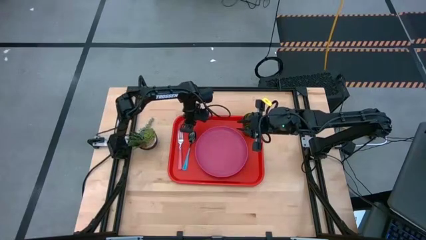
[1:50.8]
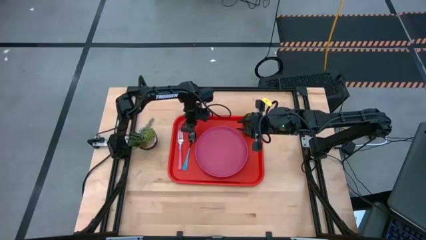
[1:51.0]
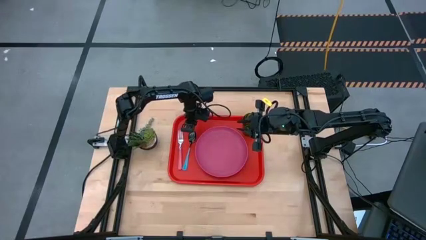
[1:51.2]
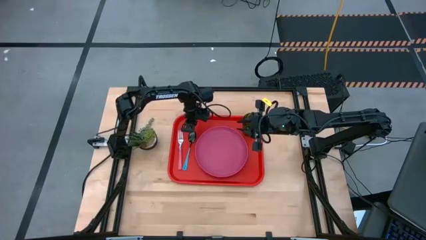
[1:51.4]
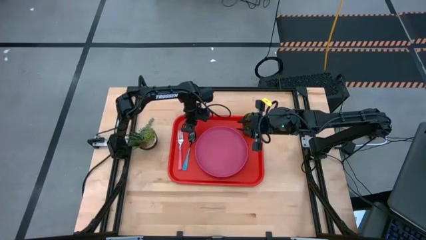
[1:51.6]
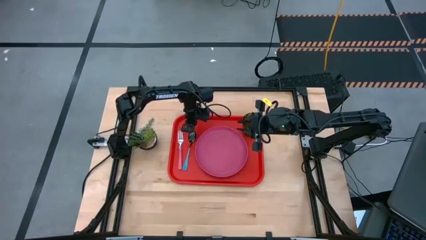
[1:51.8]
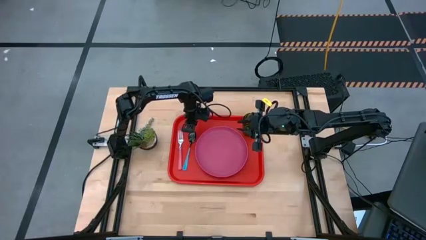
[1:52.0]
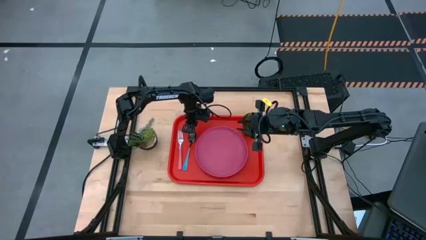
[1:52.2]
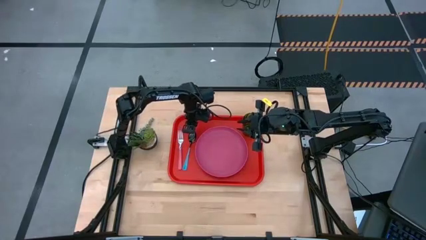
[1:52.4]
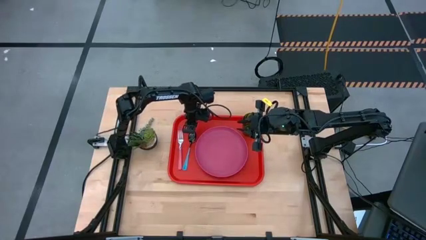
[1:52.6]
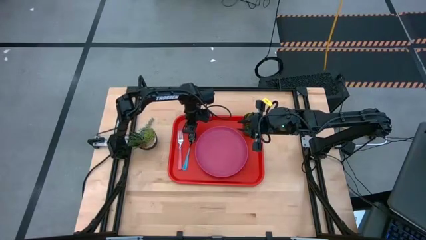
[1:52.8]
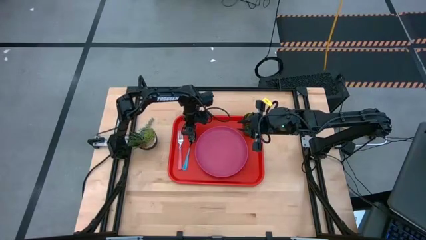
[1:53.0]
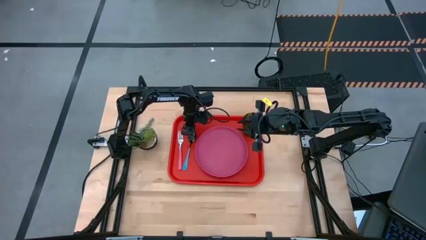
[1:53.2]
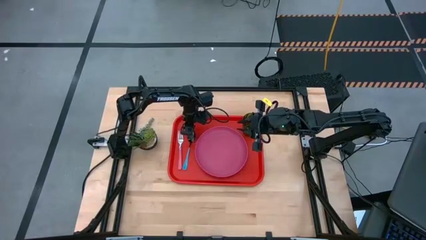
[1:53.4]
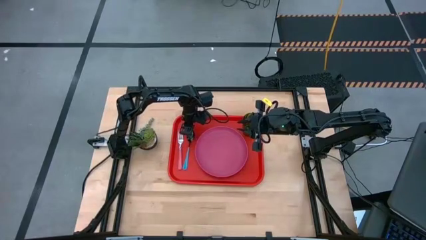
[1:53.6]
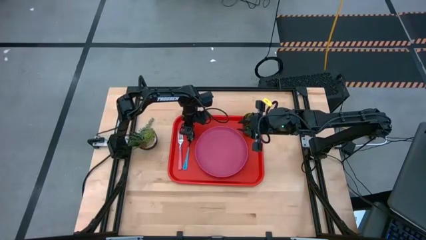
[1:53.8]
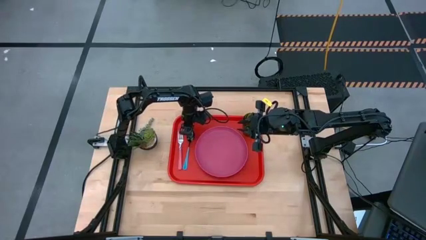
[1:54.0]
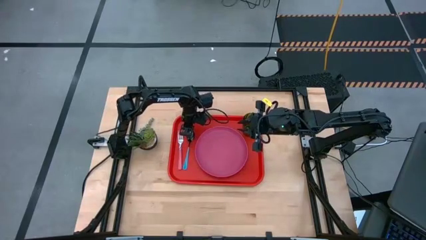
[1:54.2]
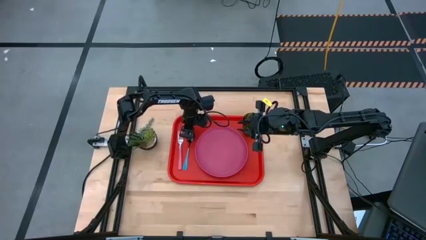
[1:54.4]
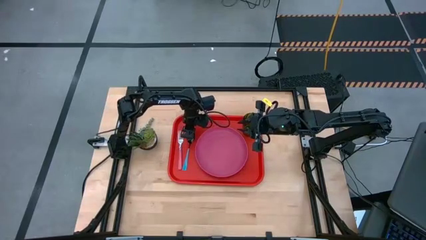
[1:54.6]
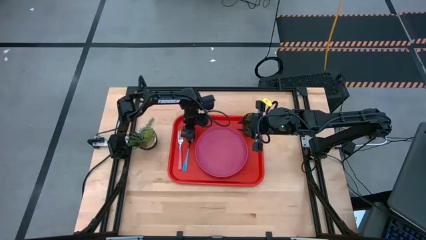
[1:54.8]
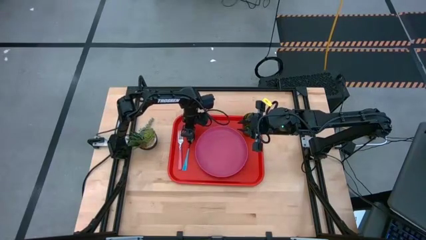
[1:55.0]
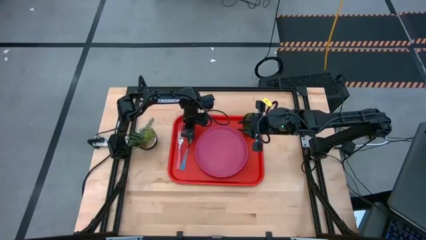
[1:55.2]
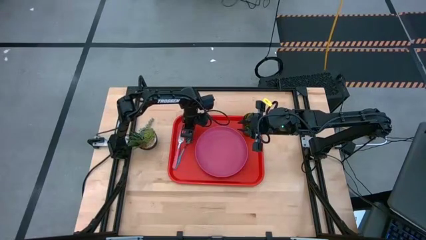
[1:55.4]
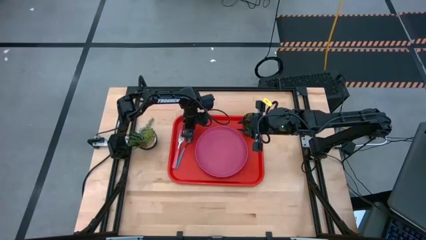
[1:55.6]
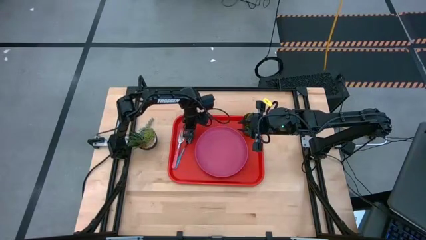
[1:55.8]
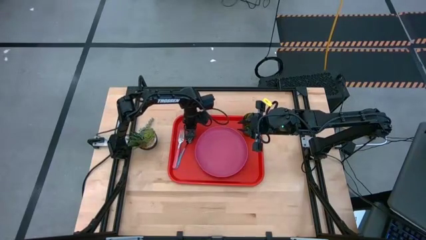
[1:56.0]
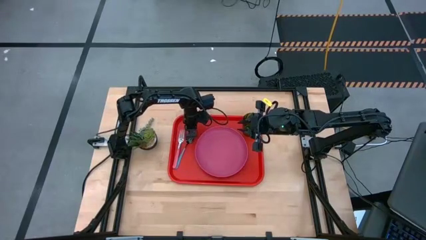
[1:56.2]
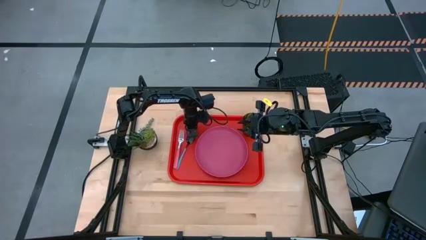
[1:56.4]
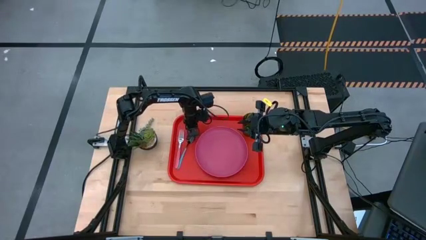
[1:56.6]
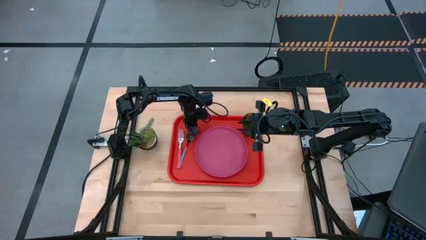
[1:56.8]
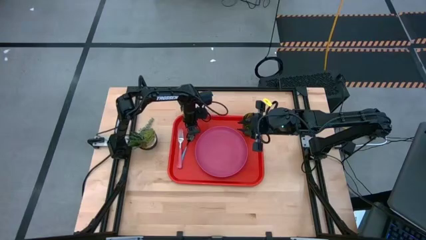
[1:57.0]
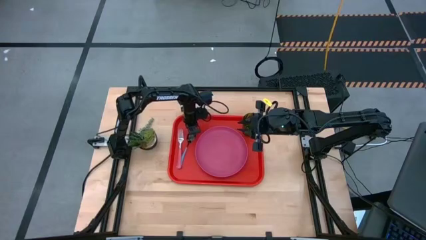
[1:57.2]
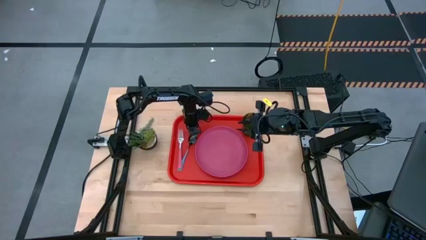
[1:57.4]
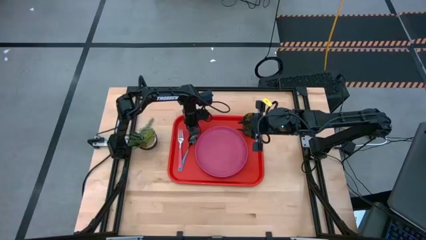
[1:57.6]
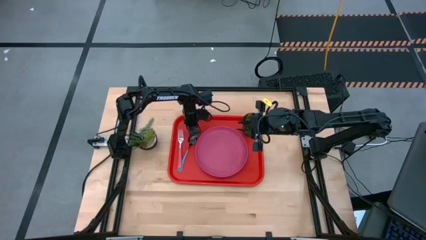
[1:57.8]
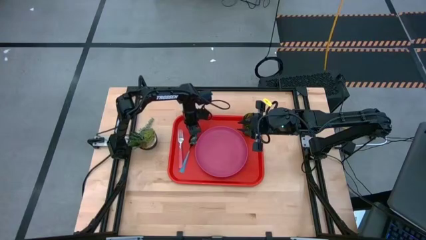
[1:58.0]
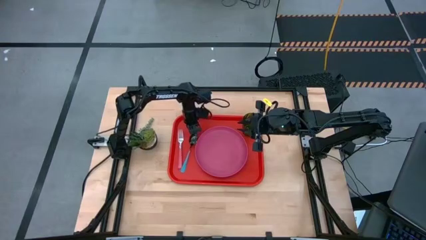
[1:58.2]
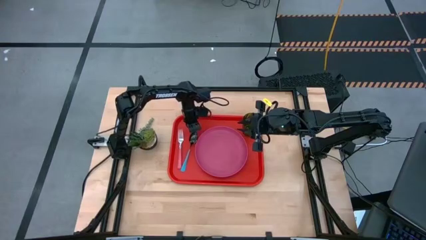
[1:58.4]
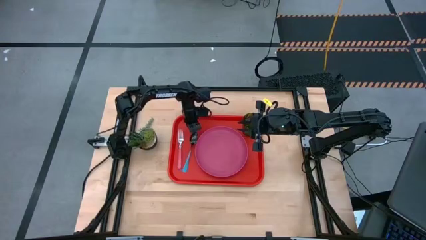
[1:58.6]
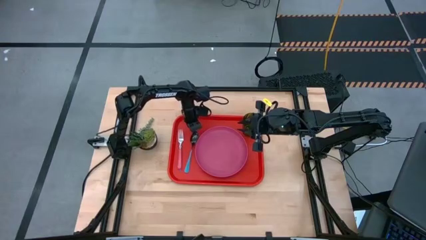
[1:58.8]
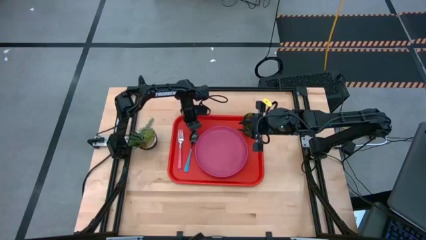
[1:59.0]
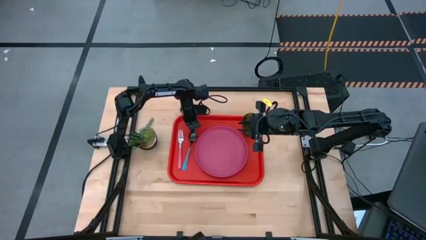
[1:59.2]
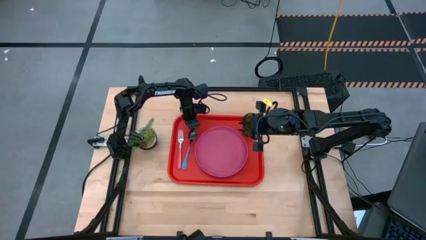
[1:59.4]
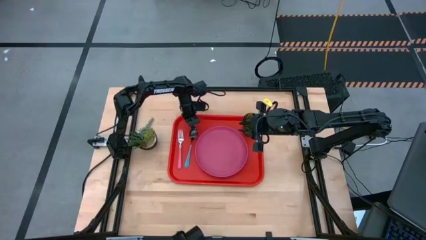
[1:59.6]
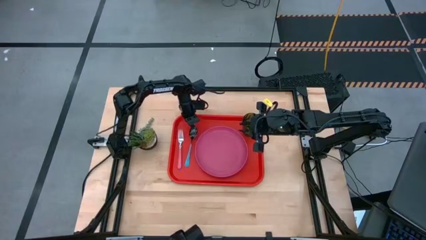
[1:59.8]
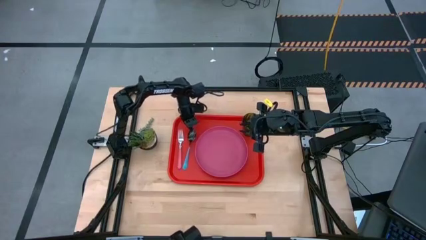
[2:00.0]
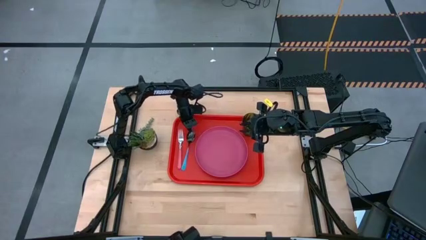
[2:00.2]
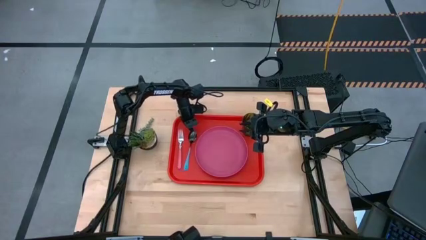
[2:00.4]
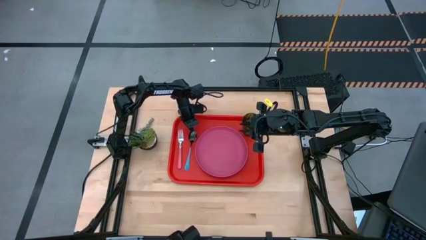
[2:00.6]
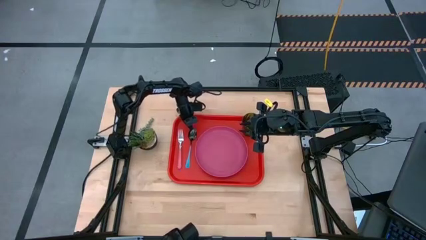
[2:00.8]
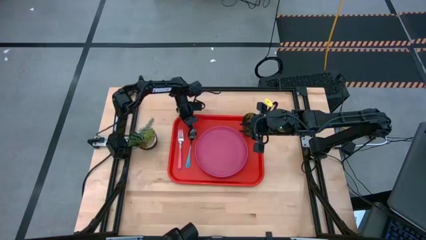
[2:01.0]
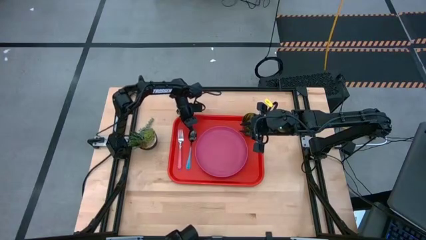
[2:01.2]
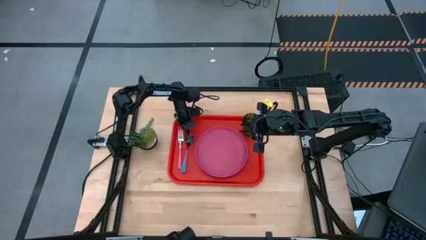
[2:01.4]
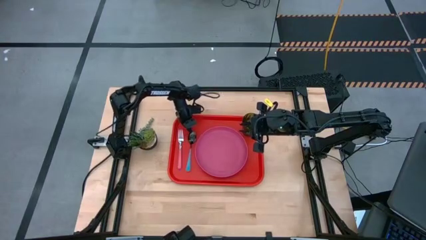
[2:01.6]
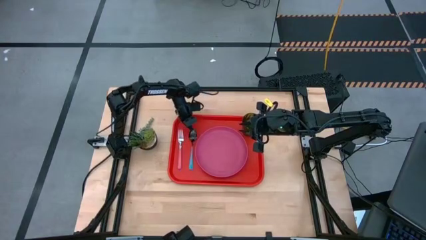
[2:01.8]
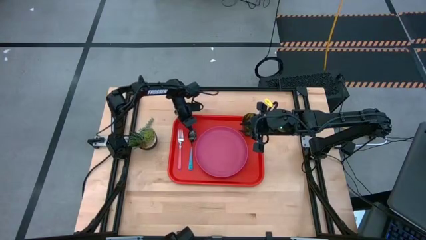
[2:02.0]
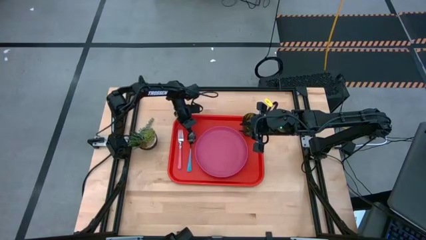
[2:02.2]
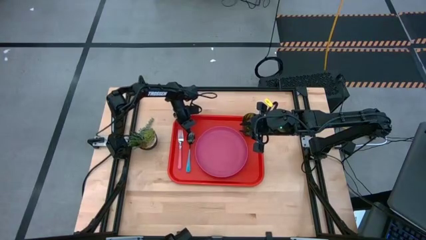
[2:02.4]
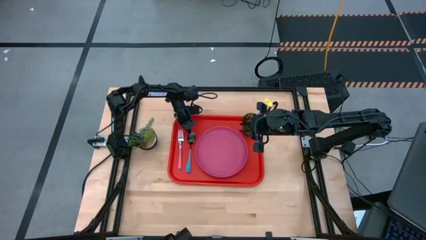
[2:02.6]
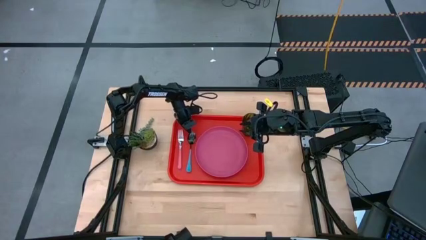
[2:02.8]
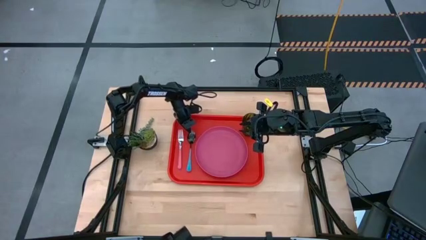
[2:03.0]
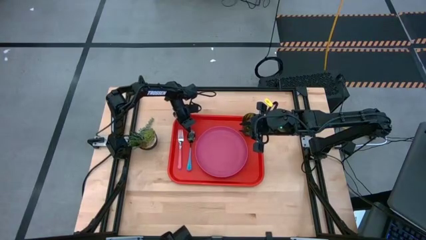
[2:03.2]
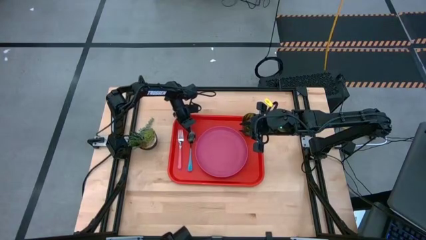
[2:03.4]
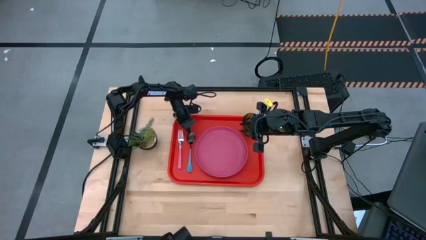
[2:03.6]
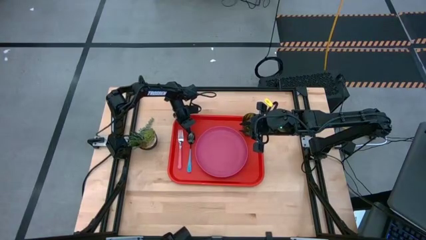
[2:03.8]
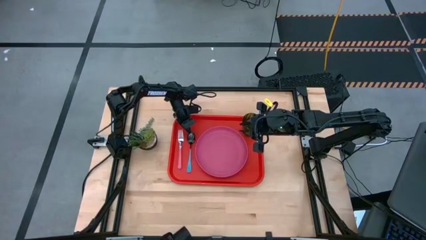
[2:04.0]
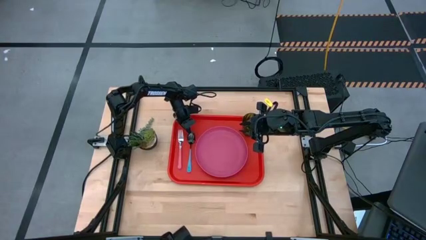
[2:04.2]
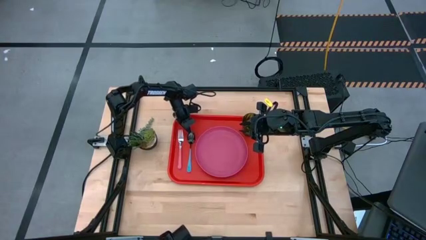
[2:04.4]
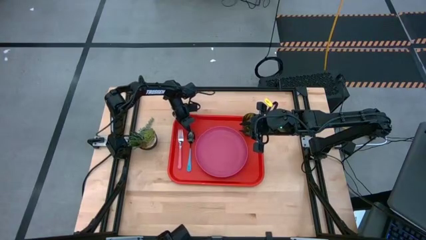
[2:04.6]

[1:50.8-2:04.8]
Task: Pick and place plate/cup/fork/spoon on tray
Adjust the silverware on the red tray

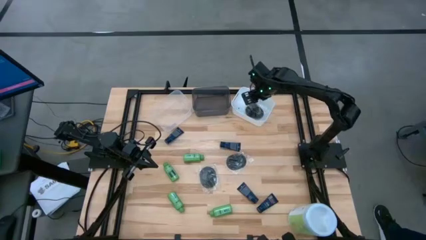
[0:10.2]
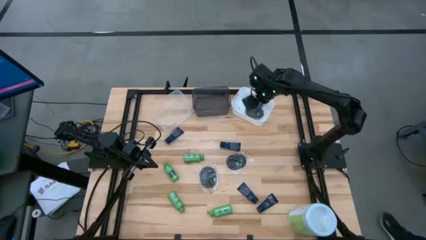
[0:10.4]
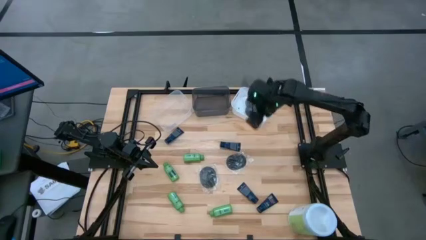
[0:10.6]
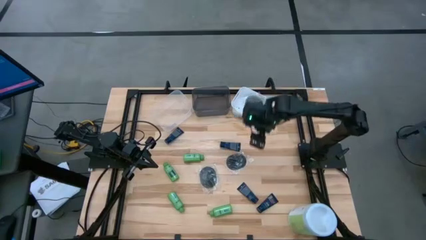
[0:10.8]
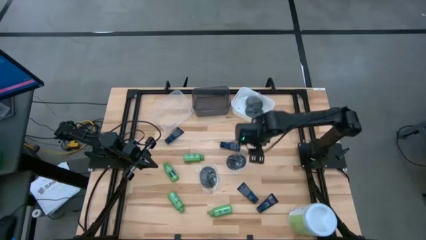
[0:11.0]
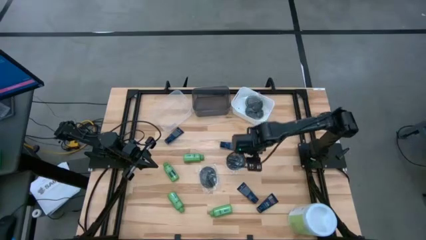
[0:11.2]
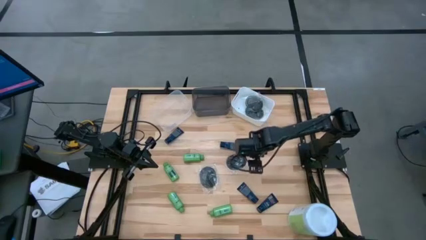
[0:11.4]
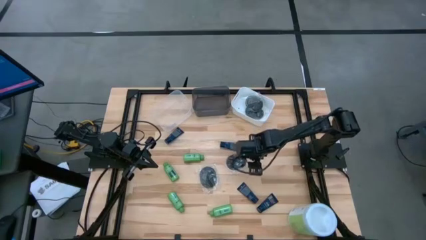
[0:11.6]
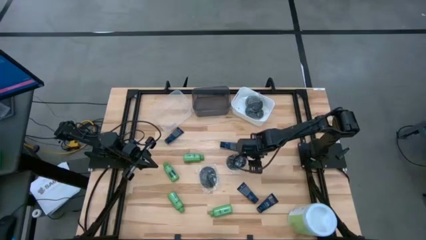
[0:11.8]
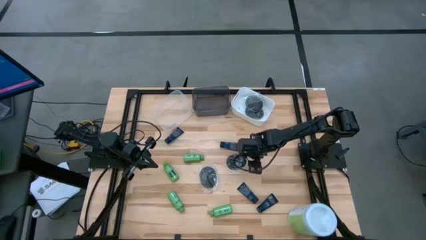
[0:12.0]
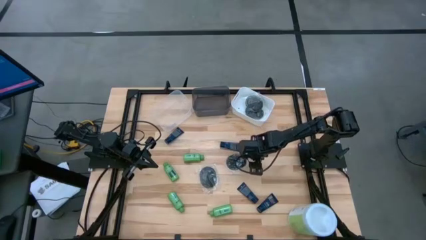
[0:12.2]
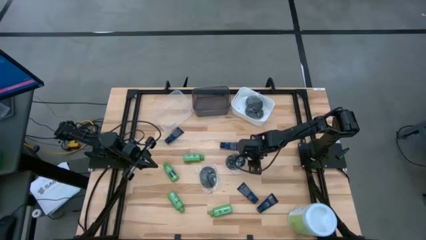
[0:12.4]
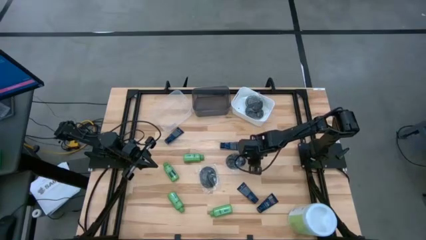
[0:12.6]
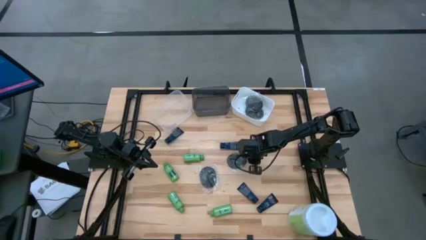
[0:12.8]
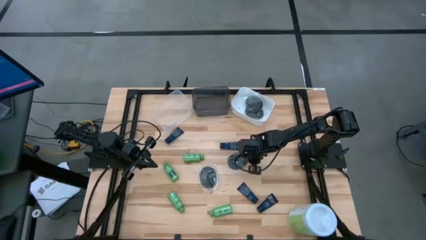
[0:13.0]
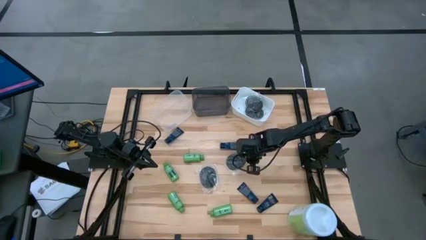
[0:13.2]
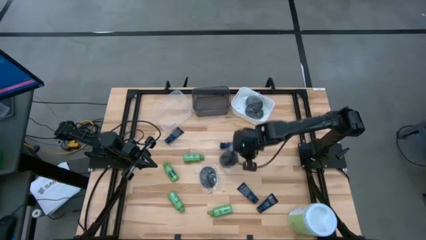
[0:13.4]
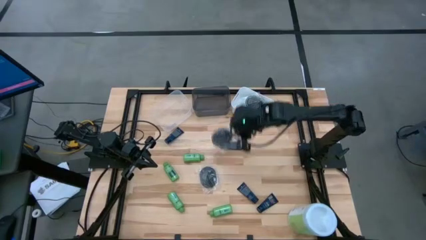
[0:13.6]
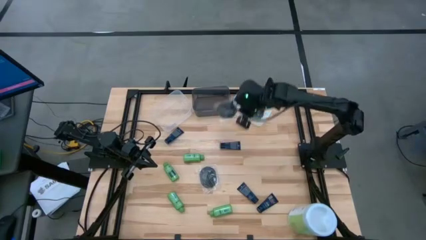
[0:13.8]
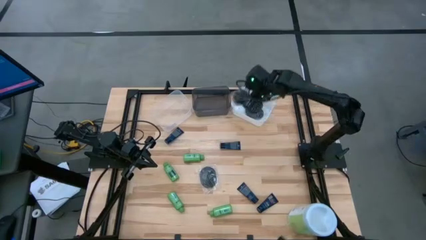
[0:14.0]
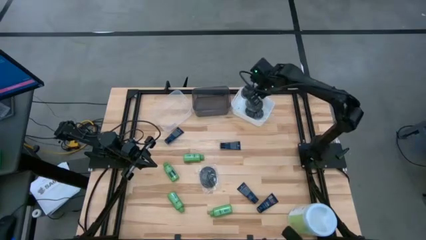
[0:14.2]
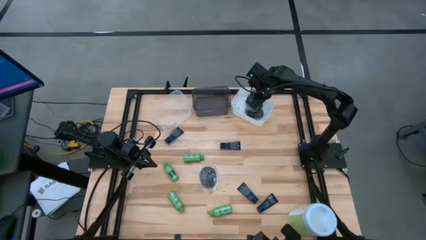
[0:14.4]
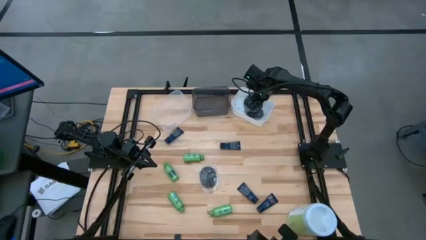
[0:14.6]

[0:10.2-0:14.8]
Task: Pick & Place Travel size toiletries
Put the black hairbrush into the white bin
